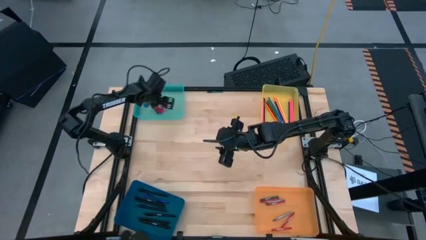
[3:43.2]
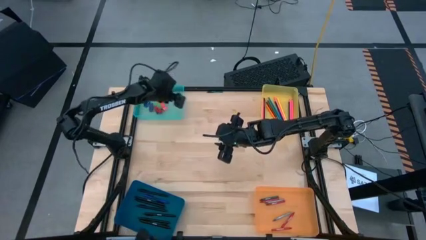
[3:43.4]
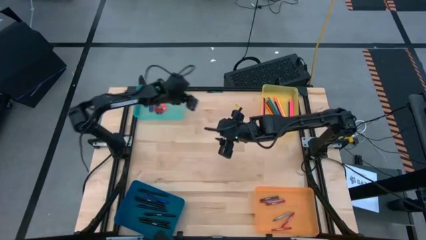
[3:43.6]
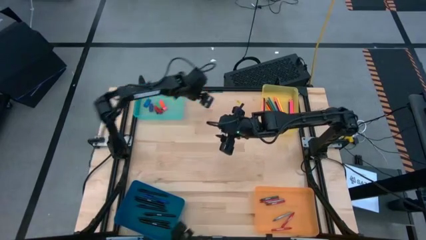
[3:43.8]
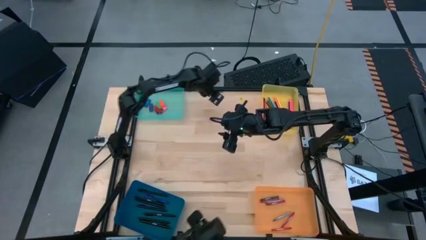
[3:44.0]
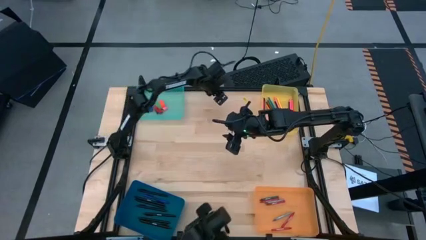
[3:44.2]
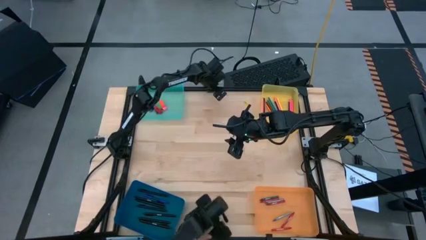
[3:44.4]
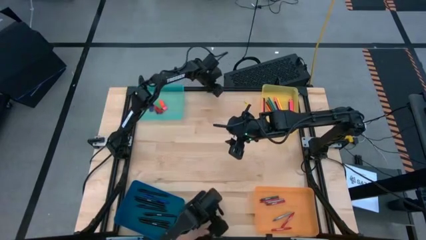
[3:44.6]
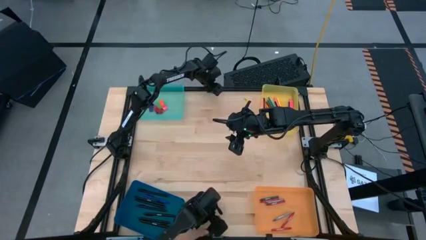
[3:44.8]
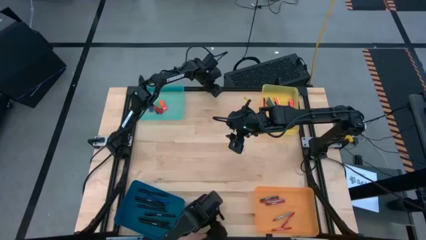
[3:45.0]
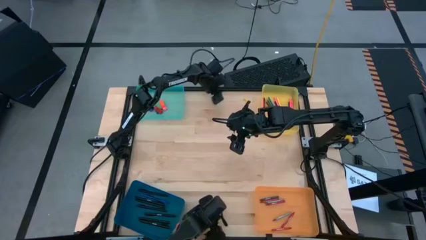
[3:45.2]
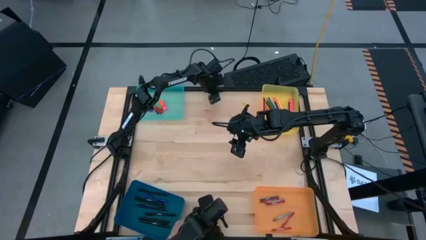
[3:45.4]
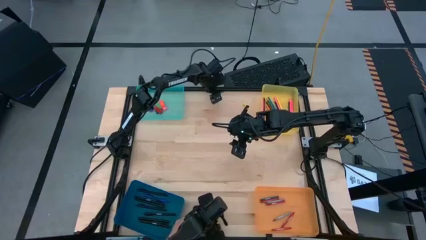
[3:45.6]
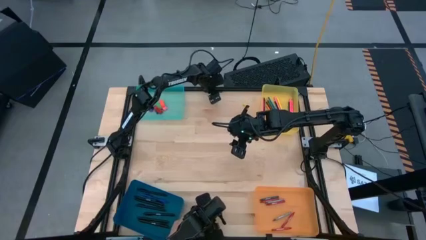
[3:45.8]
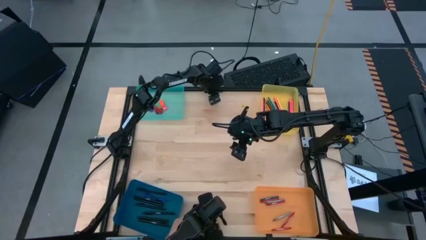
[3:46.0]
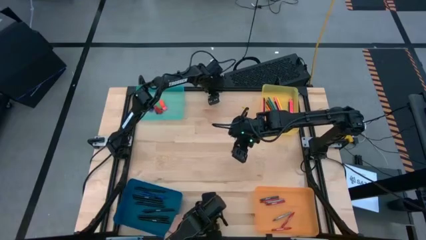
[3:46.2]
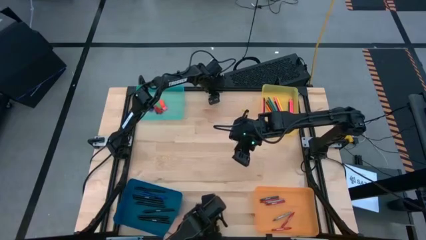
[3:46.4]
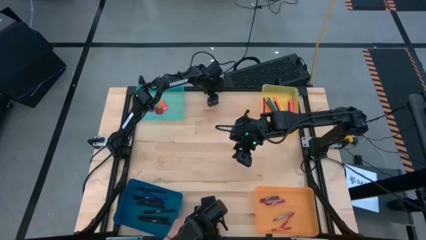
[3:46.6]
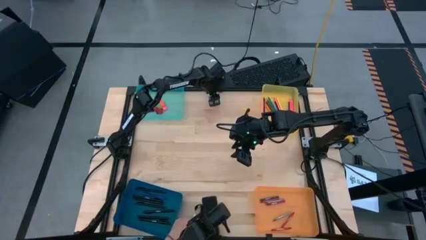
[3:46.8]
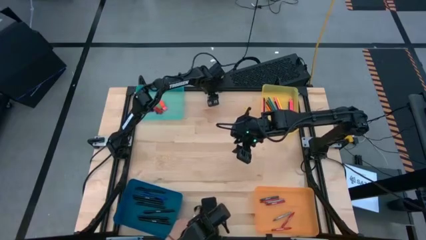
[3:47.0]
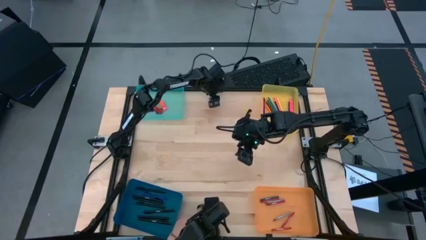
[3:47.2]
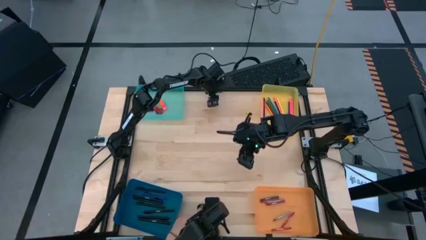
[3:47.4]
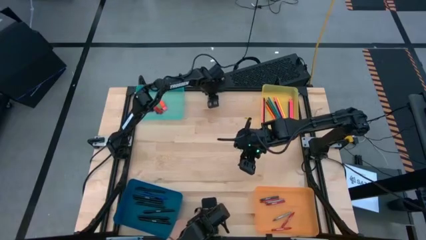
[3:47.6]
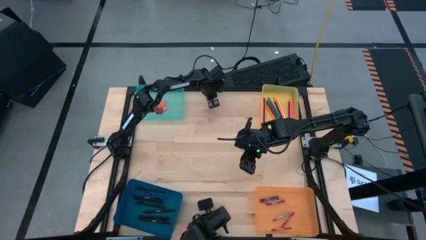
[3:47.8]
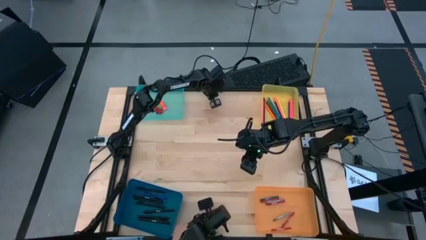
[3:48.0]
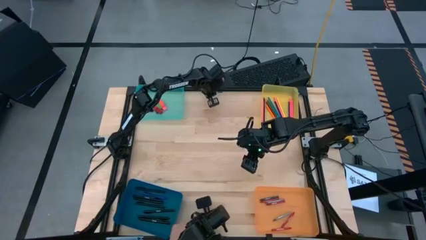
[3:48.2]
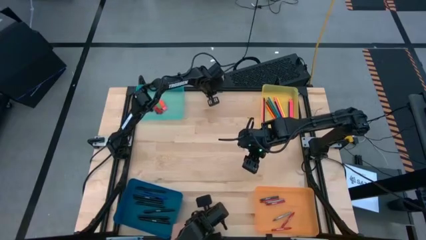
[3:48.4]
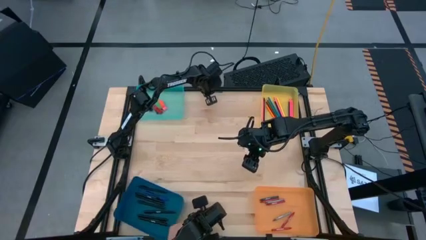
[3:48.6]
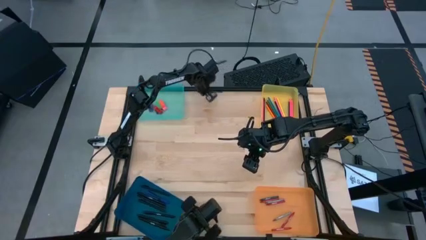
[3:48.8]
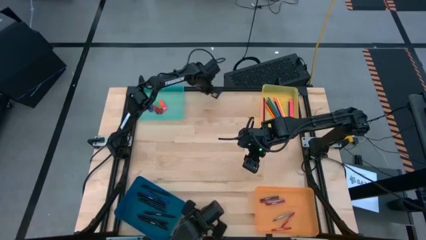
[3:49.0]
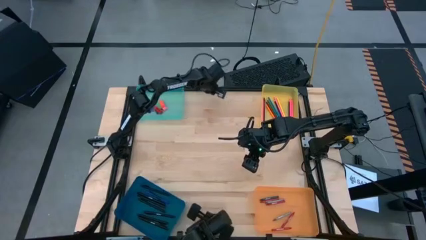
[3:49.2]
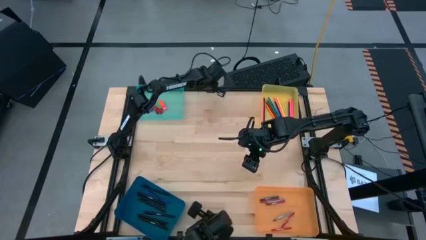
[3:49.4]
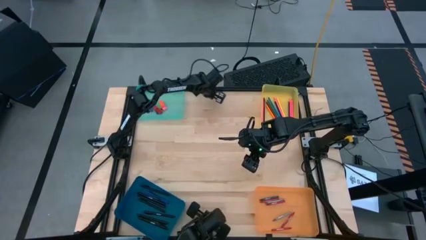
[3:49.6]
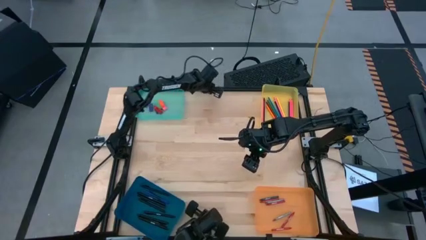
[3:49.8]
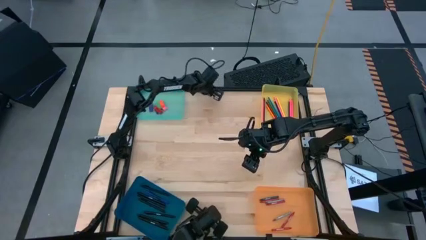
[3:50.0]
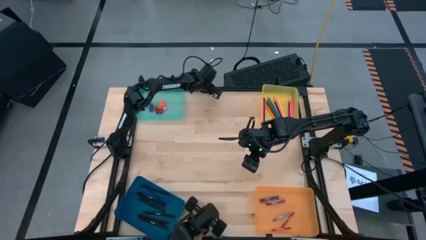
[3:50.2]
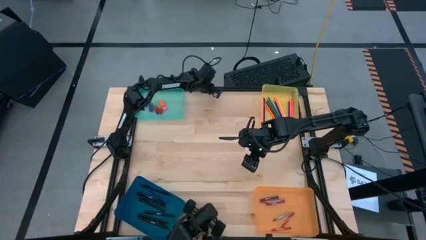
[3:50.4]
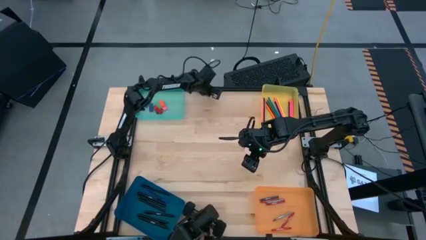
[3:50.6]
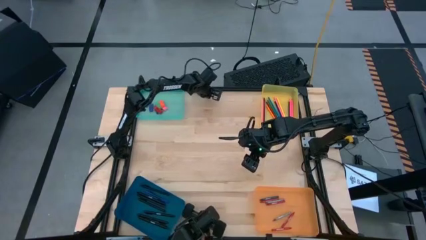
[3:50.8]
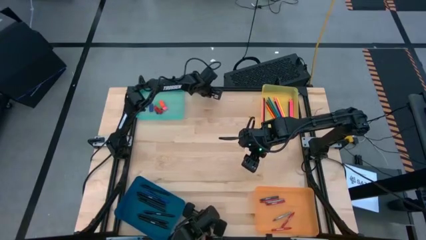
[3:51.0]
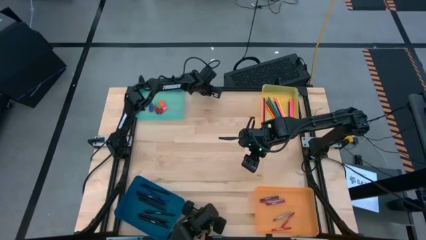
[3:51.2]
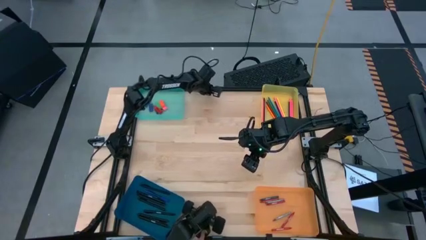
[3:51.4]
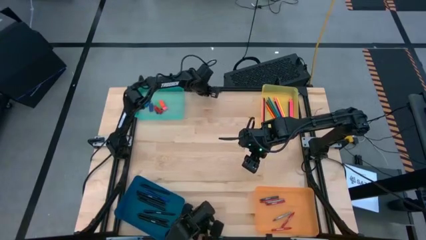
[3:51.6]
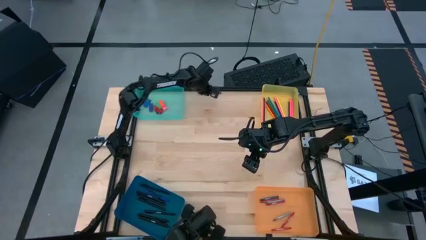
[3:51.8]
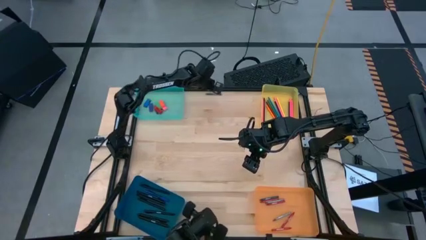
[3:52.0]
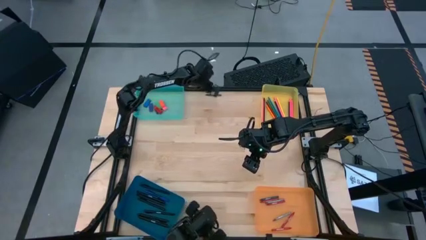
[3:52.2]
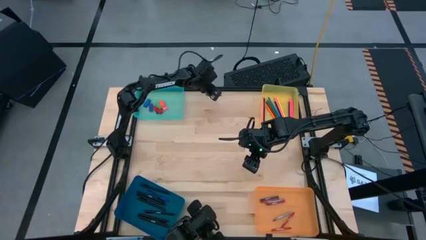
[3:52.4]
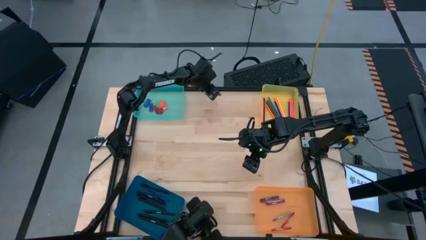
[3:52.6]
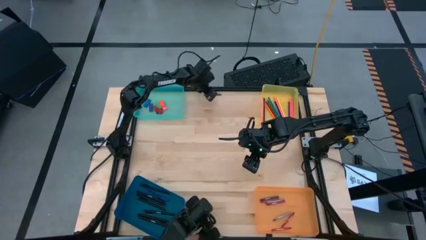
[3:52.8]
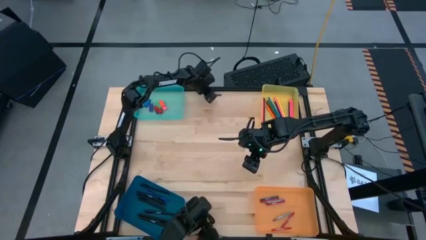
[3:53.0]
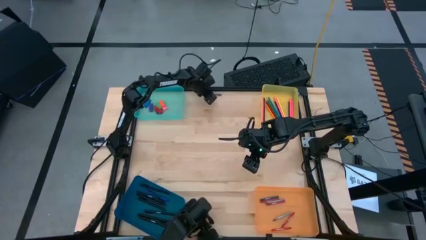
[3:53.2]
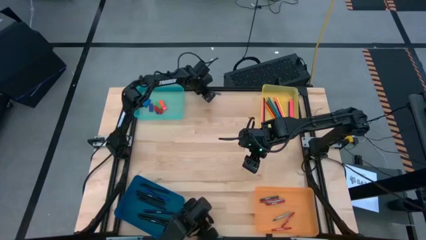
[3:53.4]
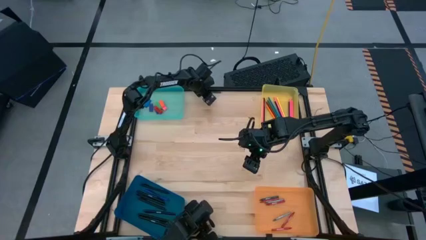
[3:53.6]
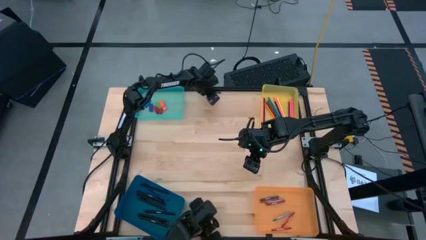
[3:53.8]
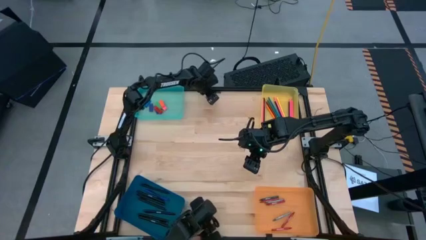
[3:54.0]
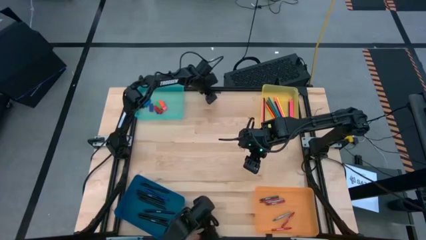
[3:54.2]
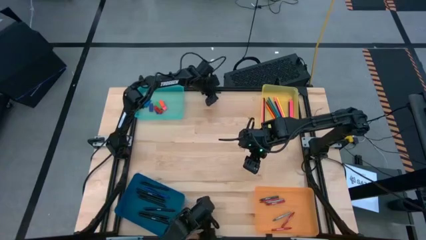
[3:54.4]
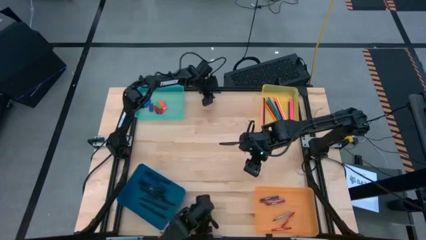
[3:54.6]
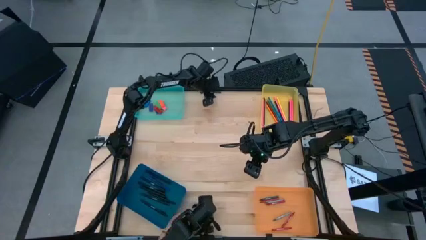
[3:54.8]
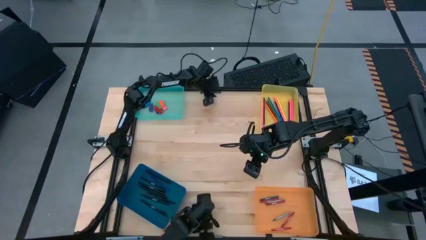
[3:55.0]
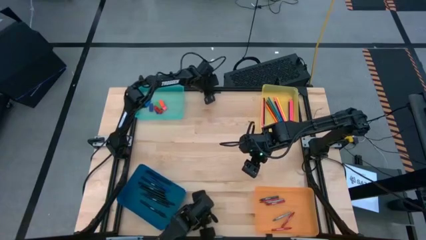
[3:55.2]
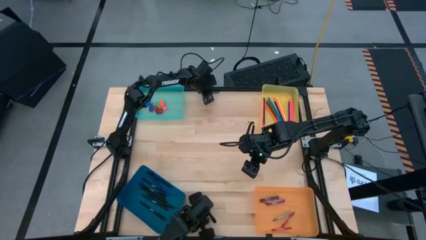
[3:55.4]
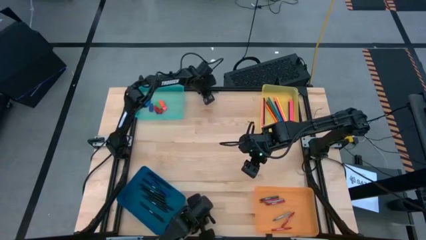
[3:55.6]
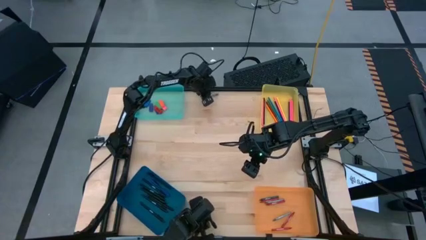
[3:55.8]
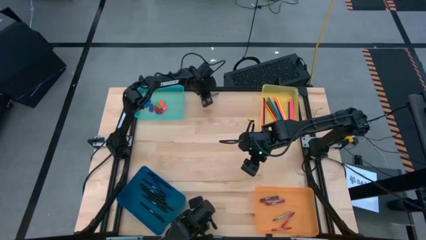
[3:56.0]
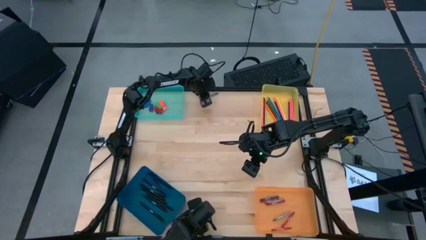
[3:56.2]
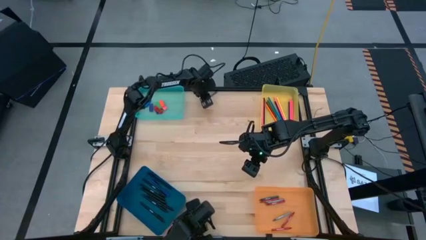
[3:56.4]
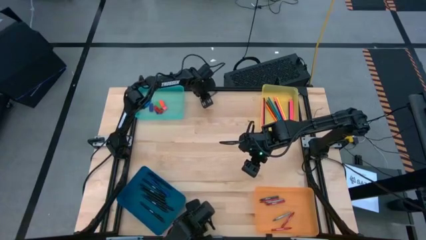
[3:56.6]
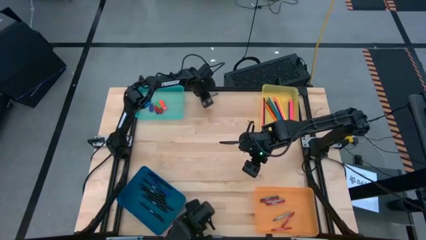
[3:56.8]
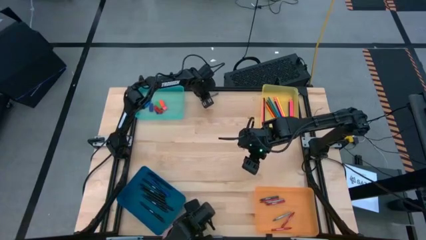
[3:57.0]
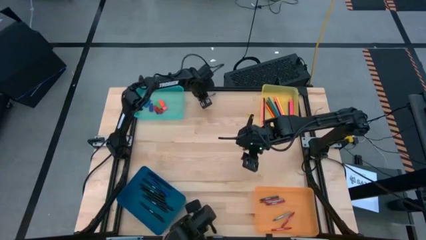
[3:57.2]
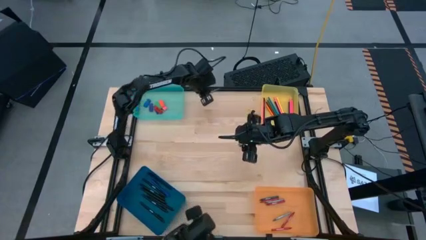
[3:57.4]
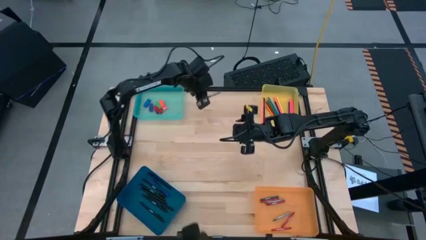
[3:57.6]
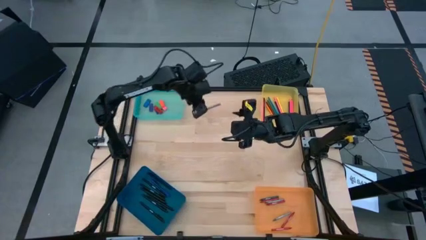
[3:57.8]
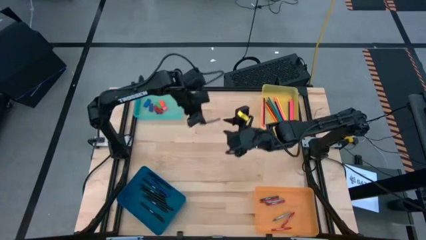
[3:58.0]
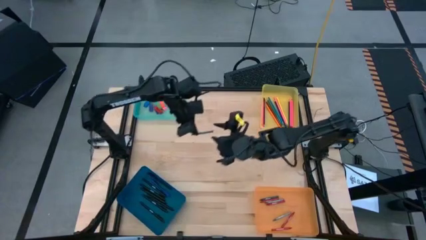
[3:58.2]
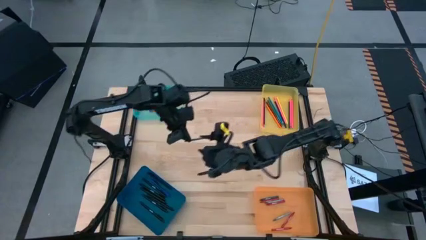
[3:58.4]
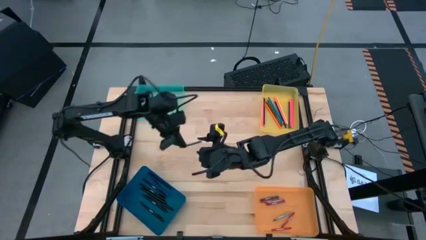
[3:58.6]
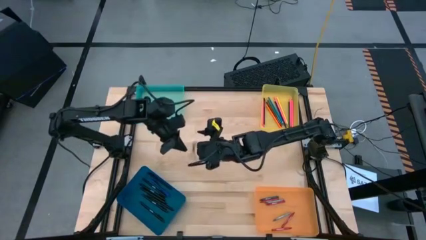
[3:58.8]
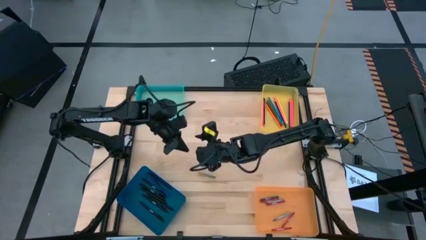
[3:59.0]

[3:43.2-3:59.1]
Task: Sort crayons/erasers/pens/pencils in bins
Put the green crayon into the orange bin

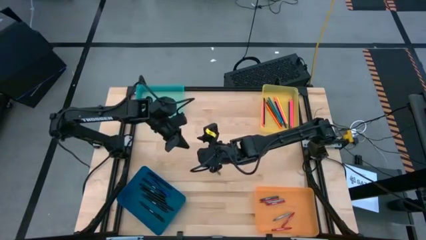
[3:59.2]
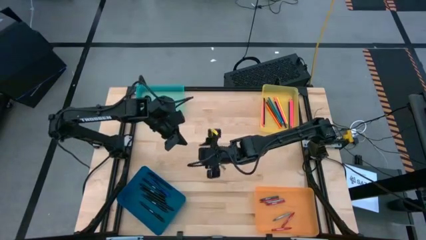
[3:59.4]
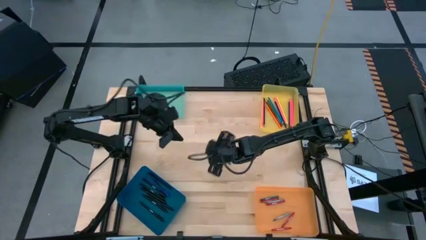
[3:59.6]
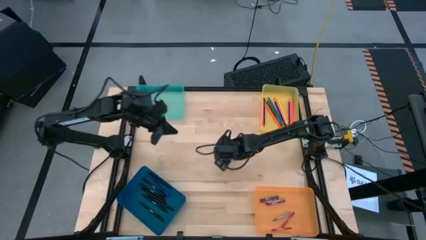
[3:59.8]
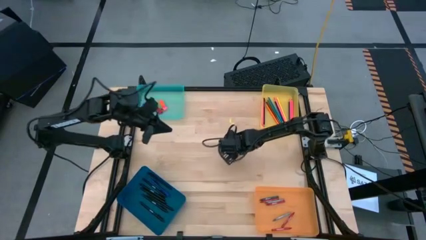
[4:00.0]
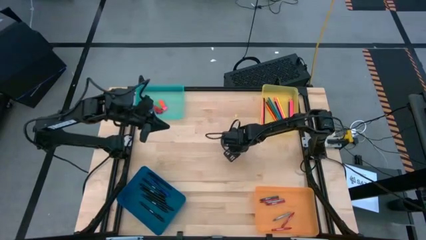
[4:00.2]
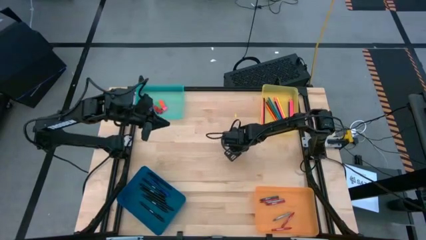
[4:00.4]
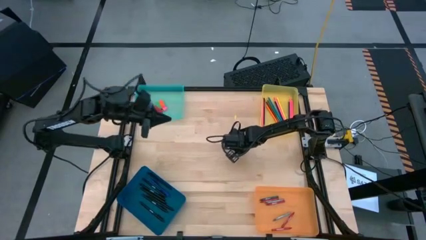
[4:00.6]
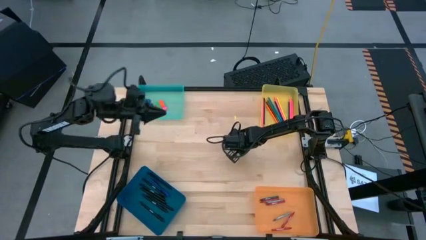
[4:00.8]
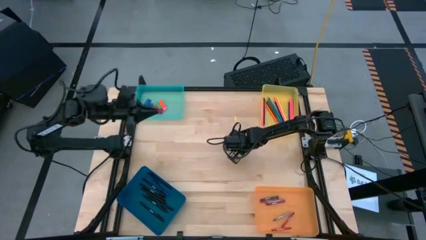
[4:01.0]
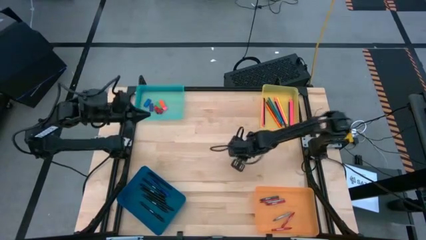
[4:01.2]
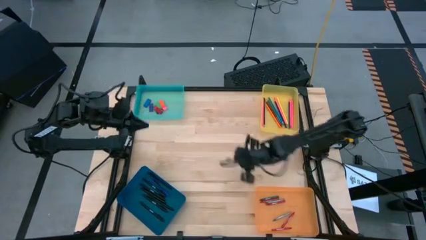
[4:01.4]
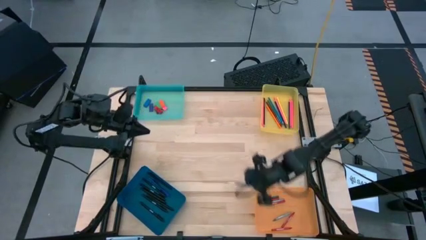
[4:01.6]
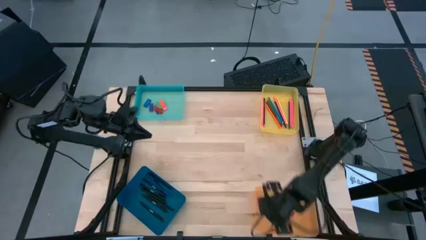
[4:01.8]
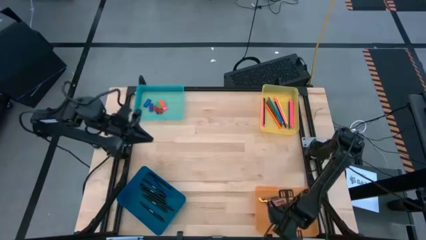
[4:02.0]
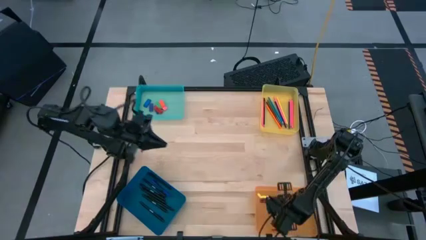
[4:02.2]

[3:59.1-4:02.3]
Put the green crayon into the orange bin
